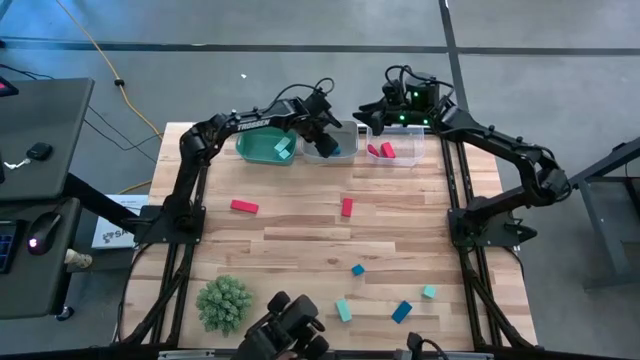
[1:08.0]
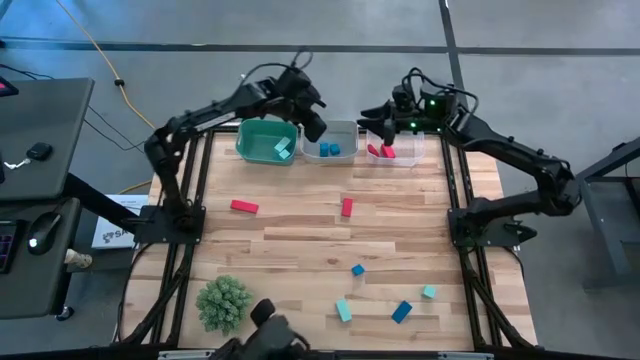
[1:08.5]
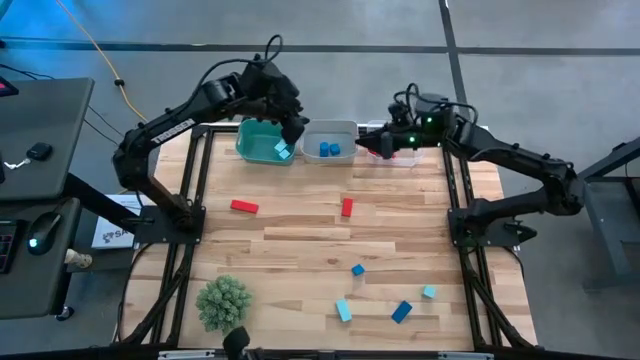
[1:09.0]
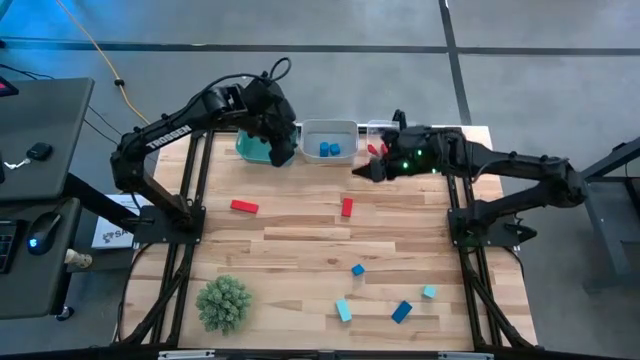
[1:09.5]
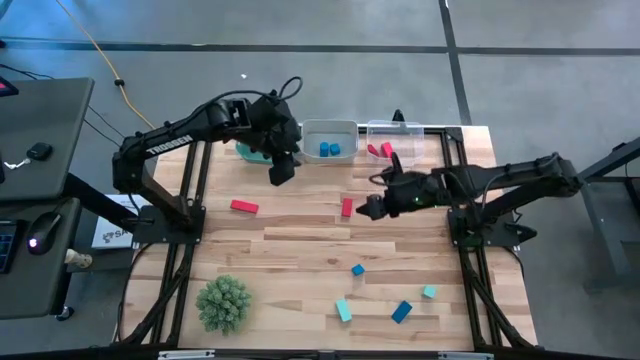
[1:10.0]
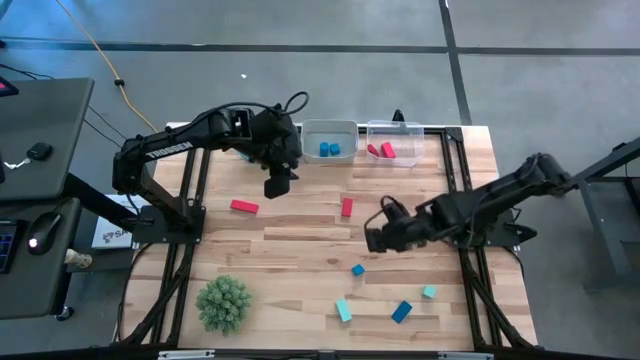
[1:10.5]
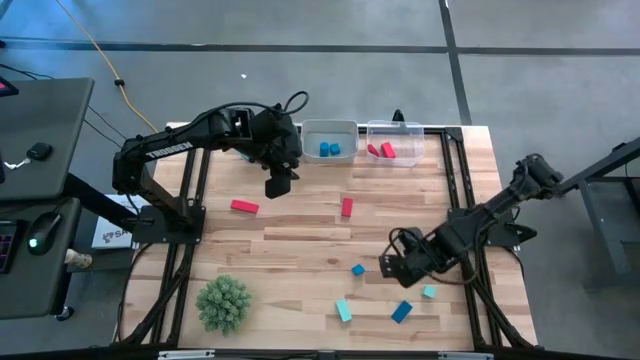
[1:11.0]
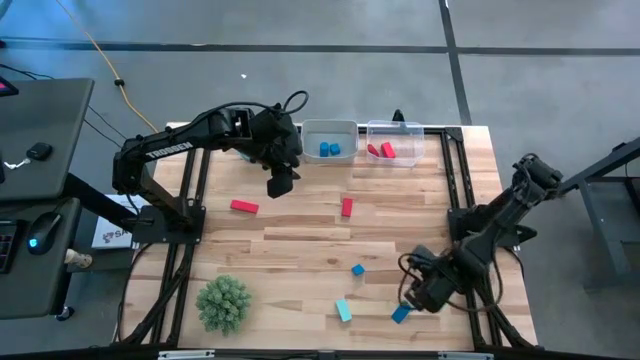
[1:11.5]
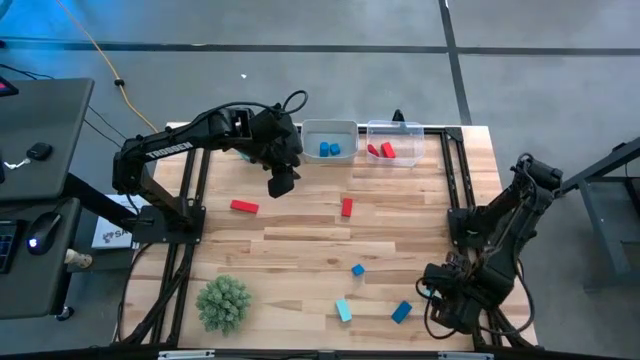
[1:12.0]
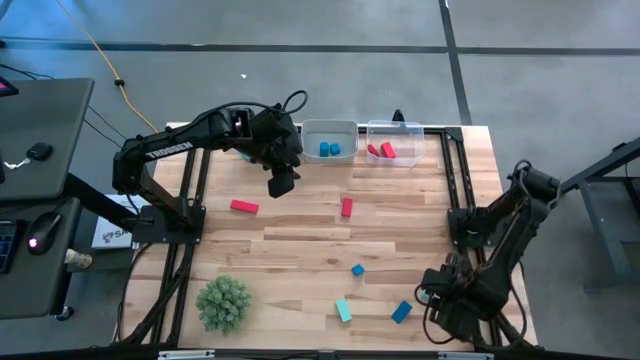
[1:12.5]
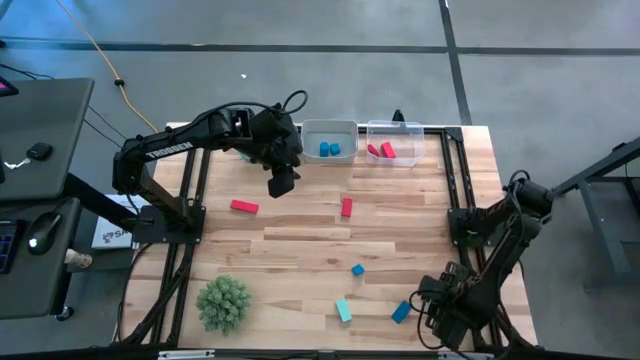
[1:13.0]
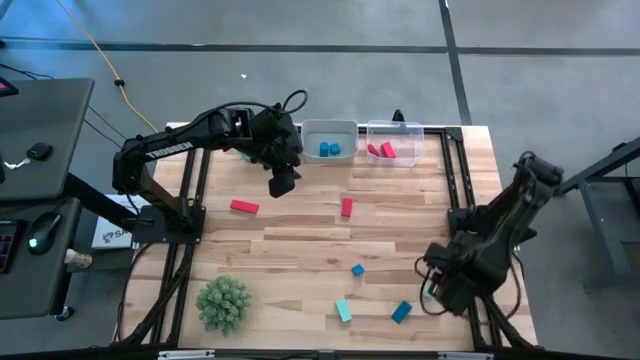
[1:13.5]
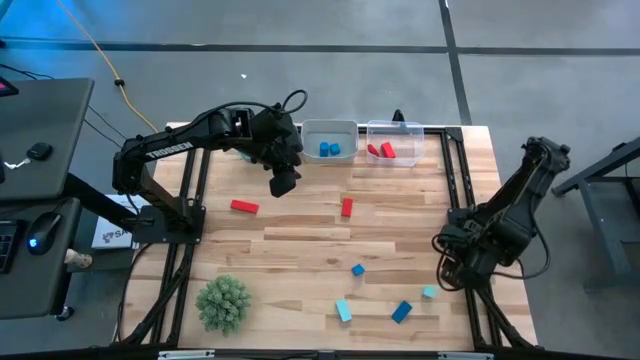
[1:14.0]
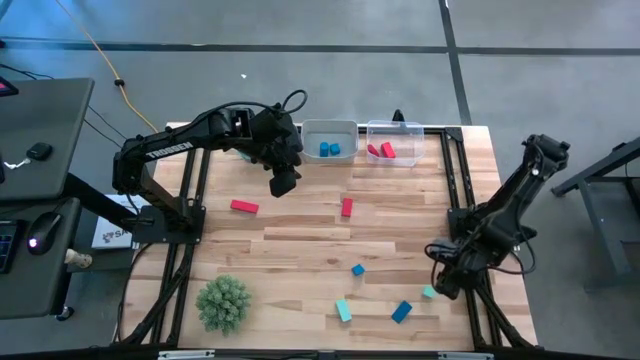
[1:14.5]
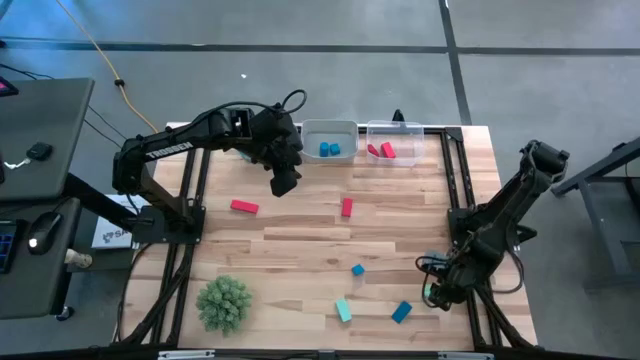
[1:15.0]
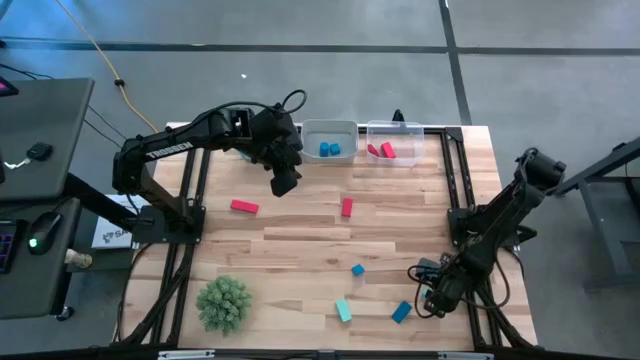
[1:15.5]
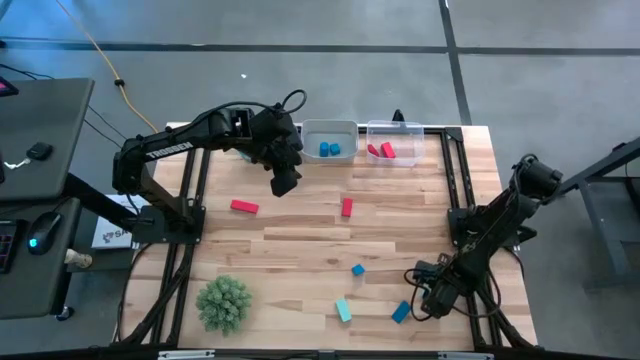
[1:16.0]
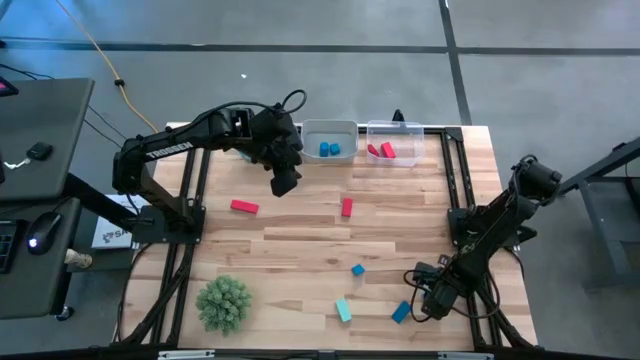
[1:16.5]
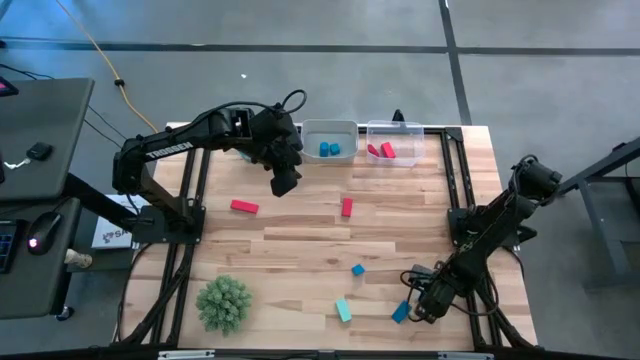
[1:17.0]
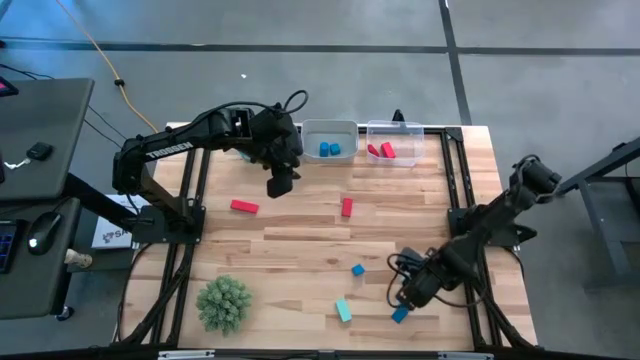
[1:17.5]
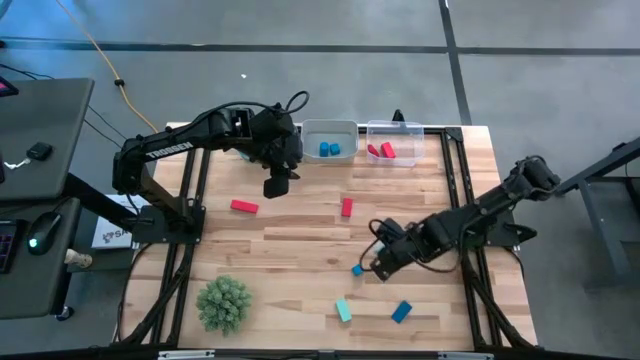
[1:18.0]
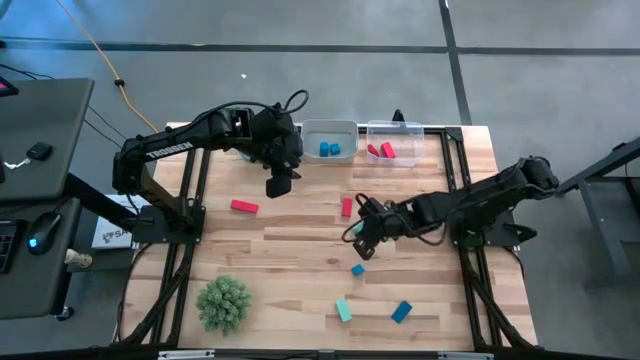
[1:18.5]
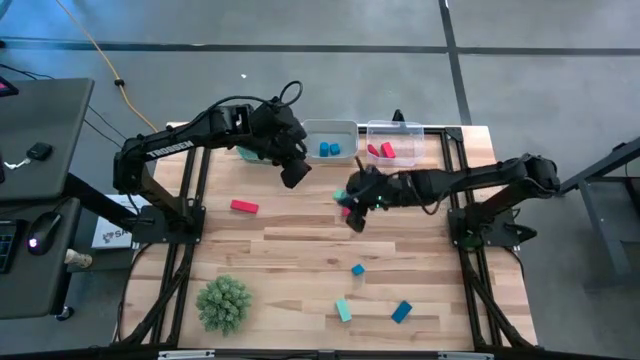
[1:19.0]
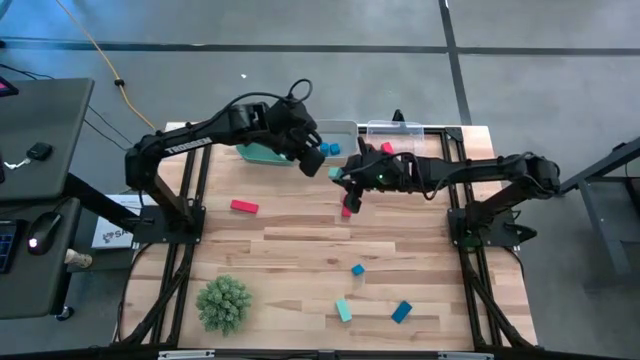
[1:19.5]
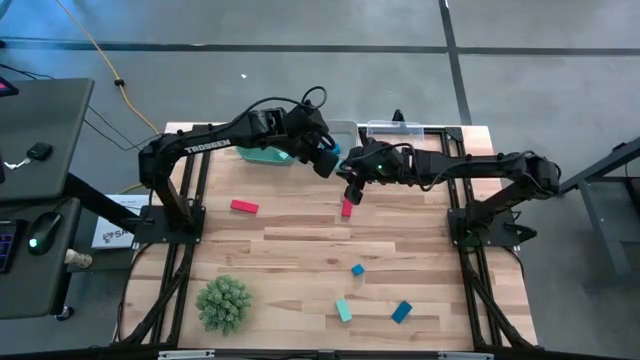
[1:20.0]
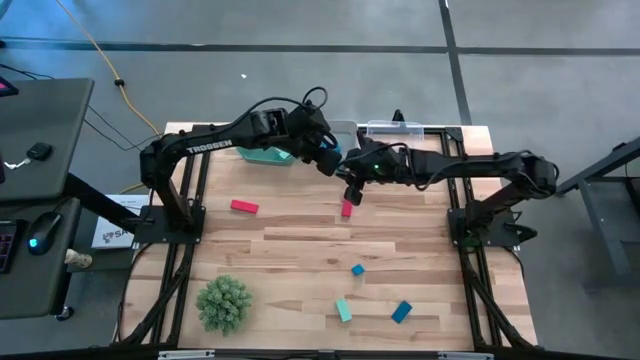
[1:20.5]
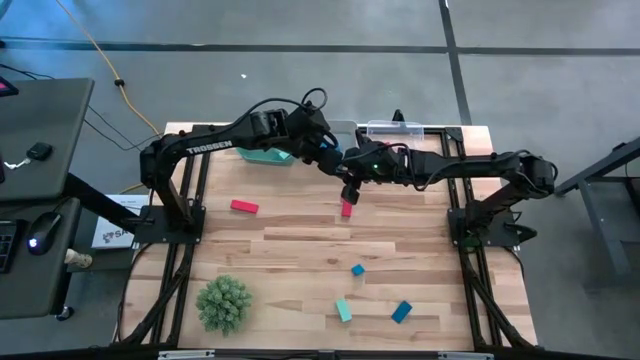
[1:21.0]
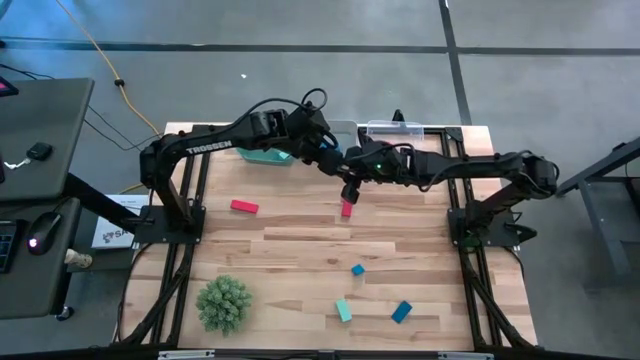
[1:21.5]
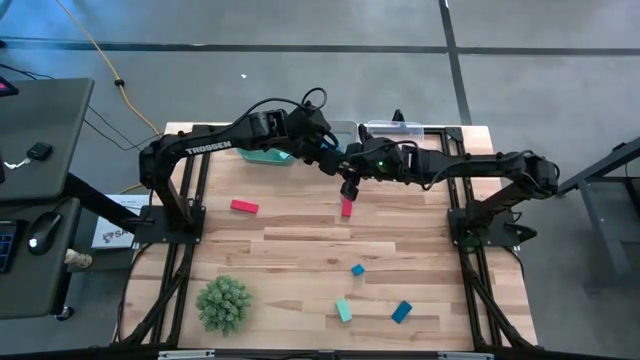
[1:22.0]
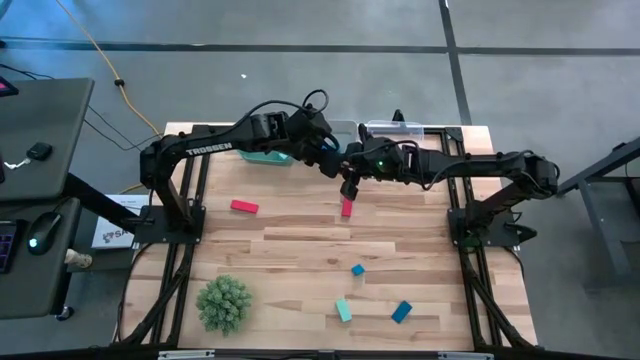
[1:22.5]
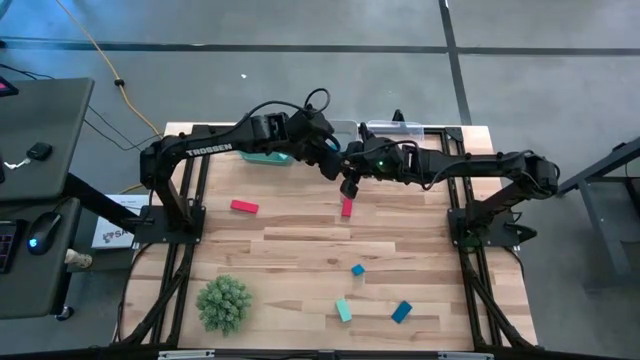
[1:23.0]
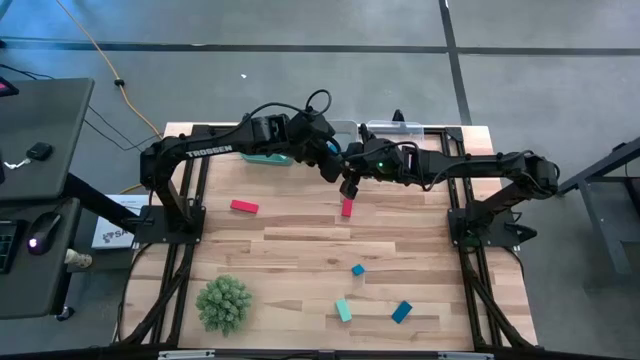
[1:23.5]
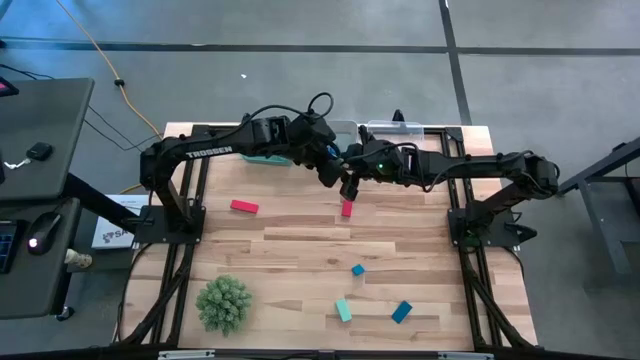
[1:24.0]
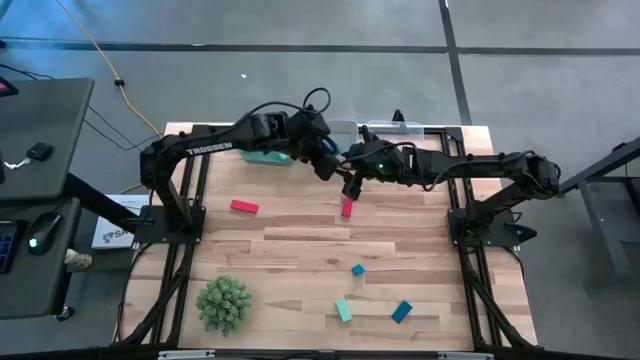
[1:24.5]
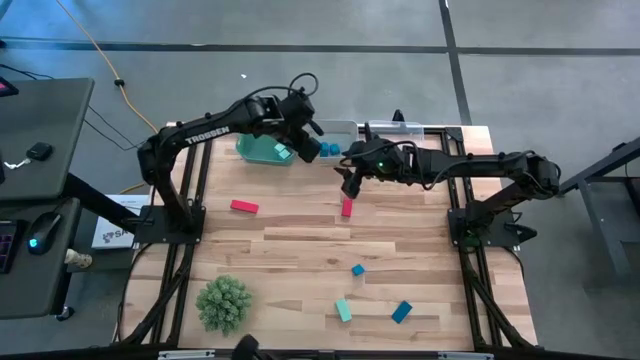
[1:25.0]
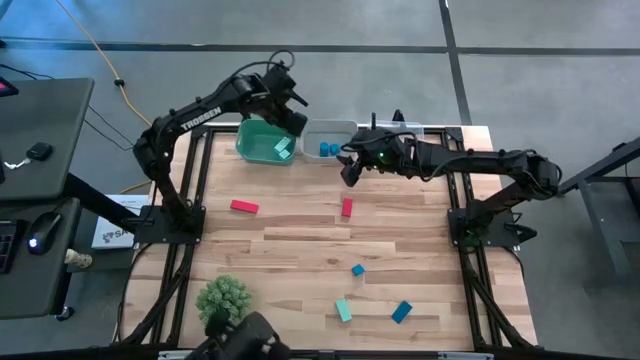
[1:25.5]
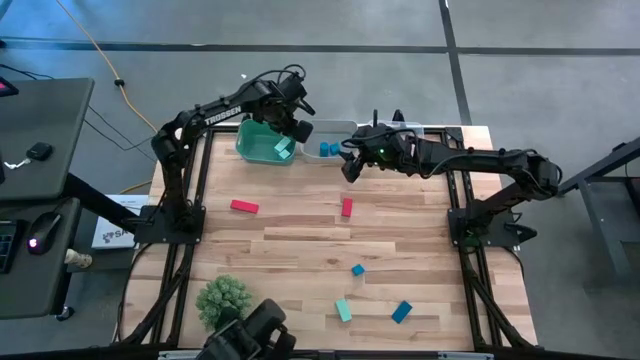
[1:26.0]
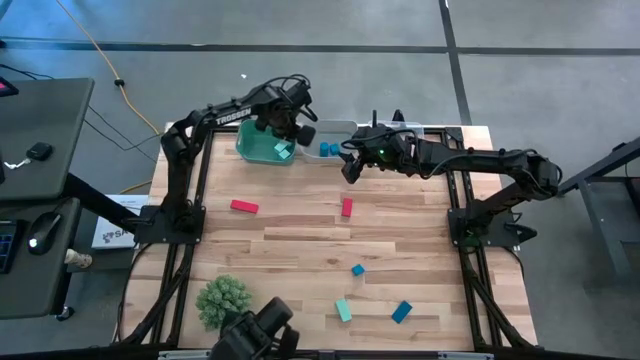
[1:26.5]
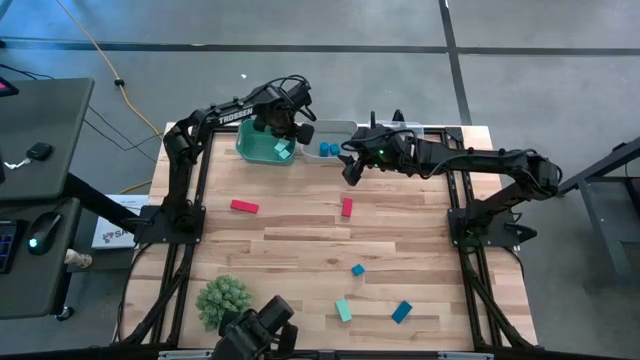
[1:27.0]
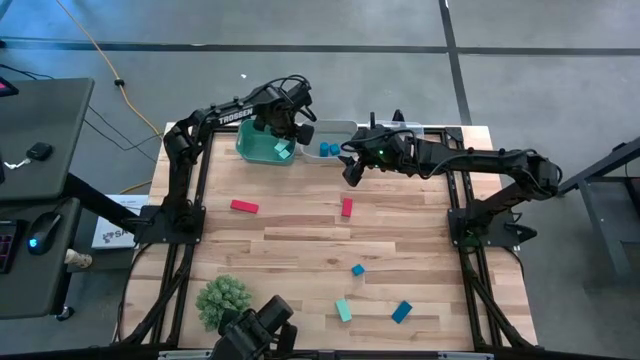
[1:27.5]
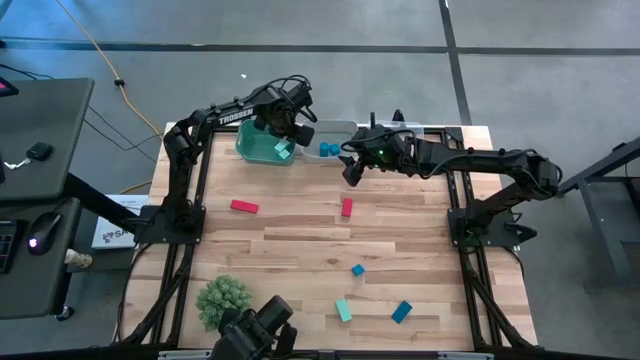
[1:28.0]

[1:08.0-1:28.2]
Task: Sort & place blocks by color
Put the right light blue block into the green bin
